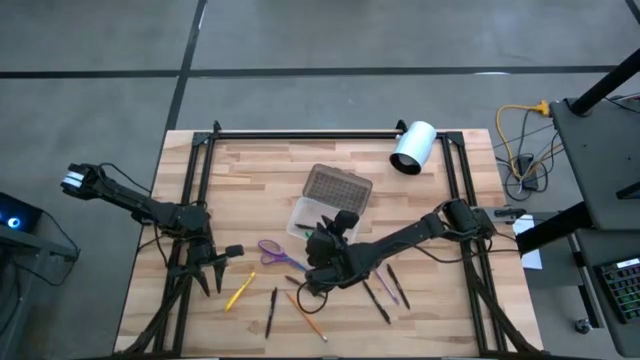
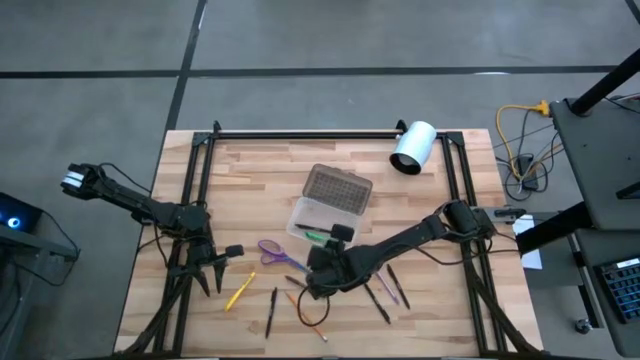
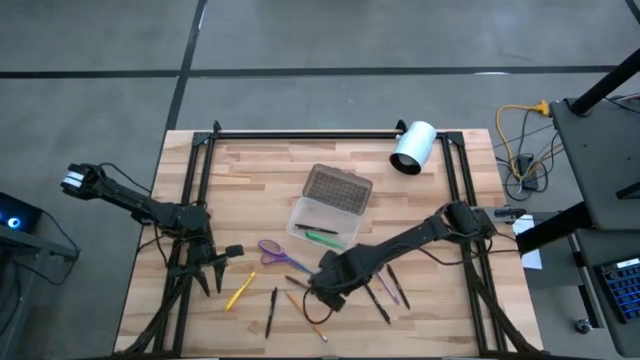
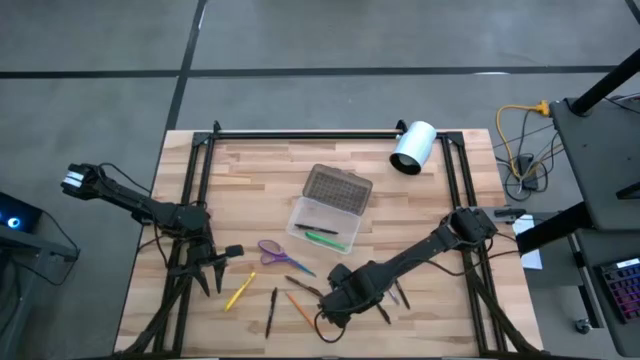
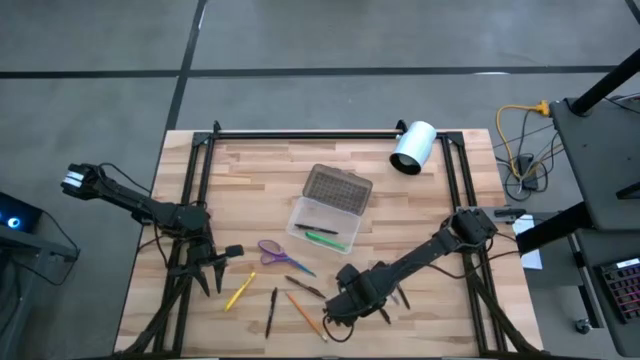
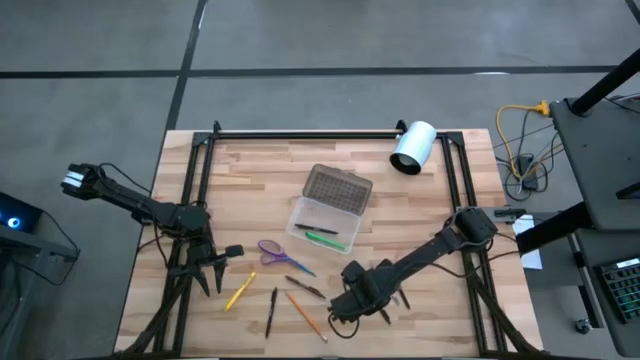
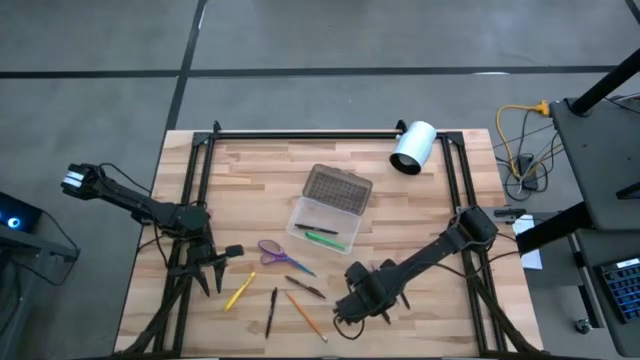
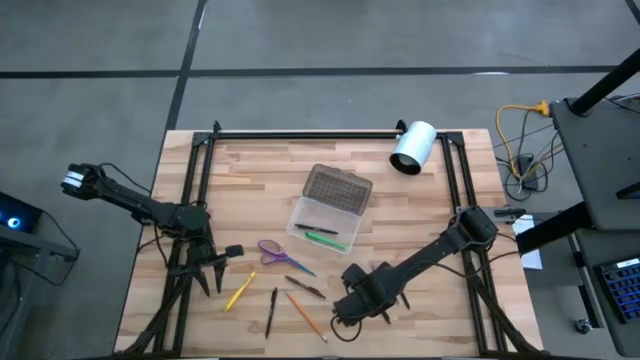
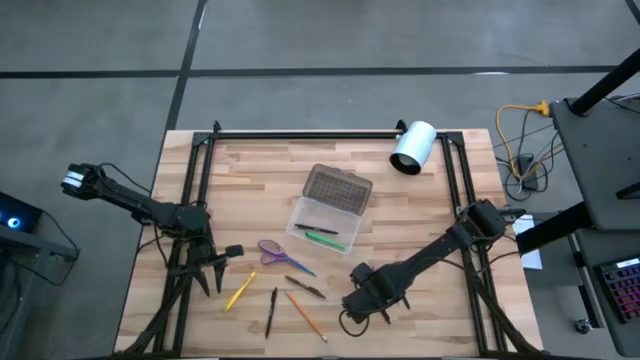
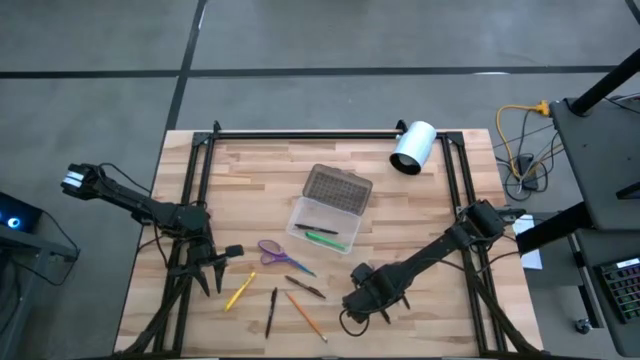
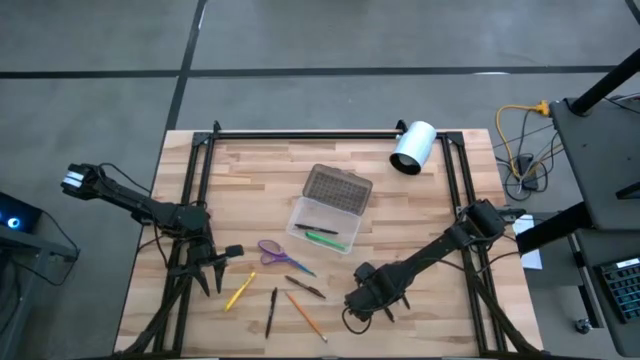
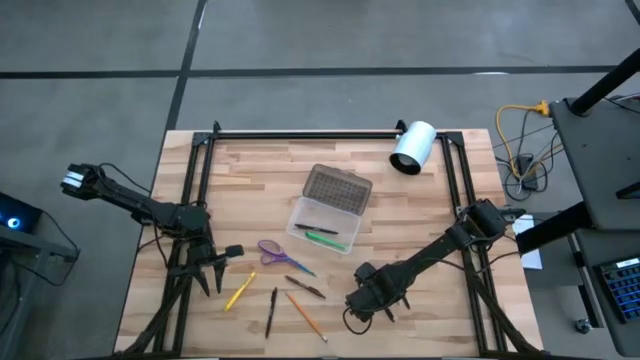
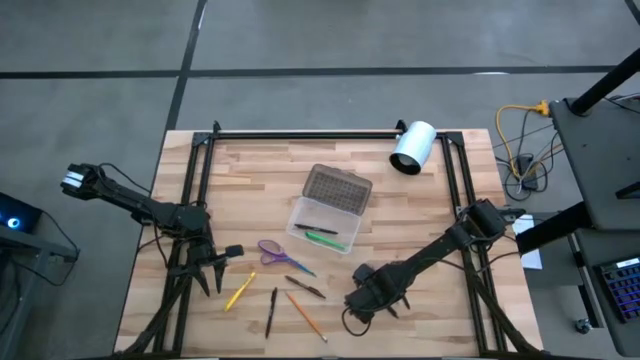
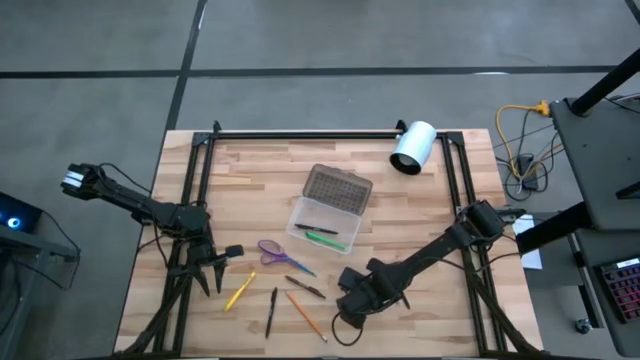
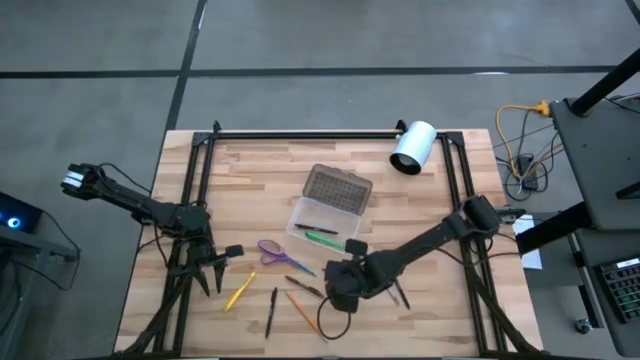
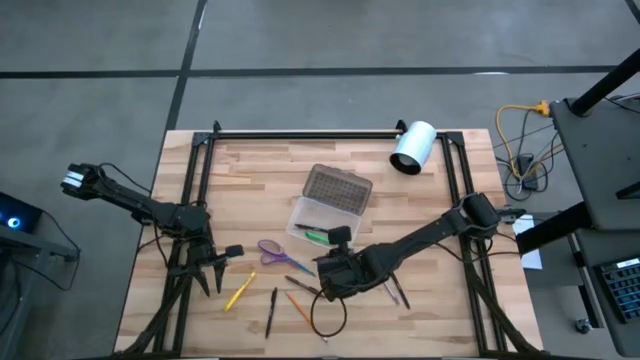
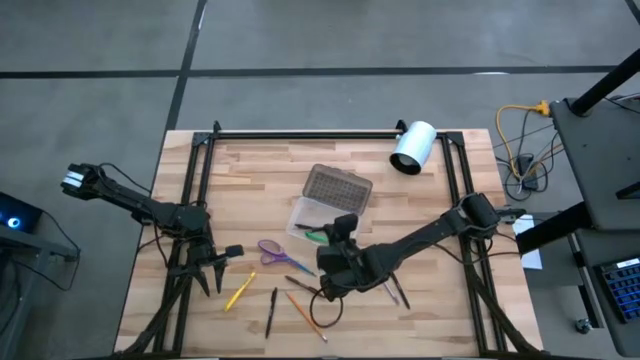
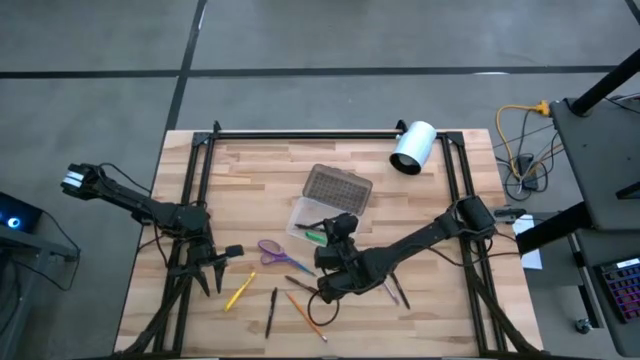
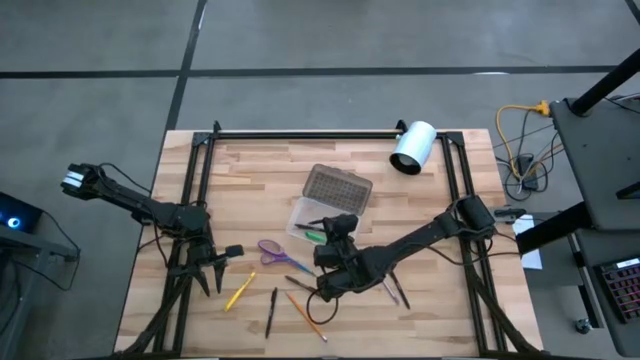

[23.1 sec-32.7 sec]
Task: Pick & place school supplies into a supply box
Put the black pen into the supply box

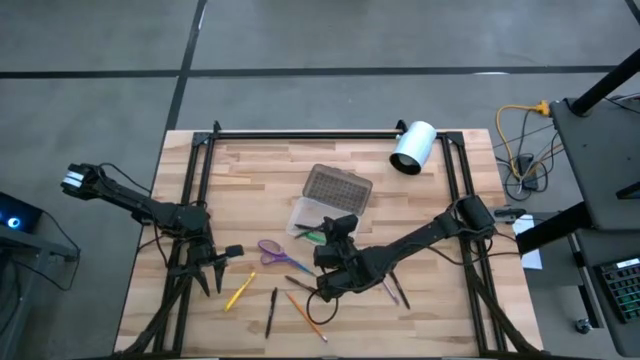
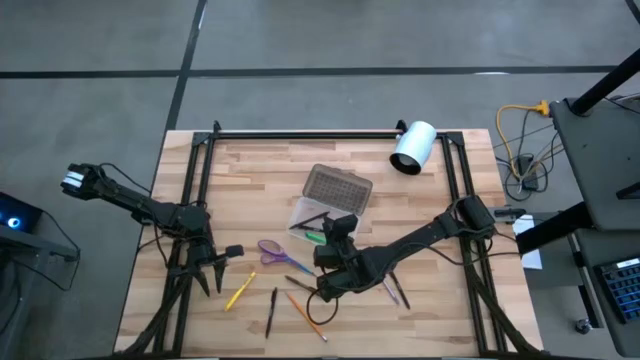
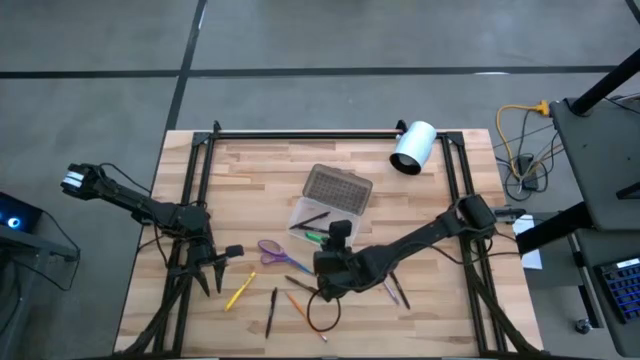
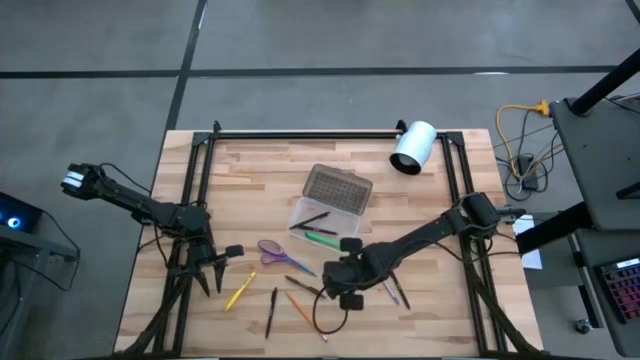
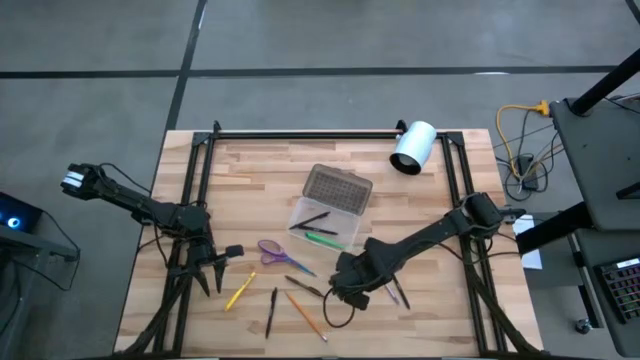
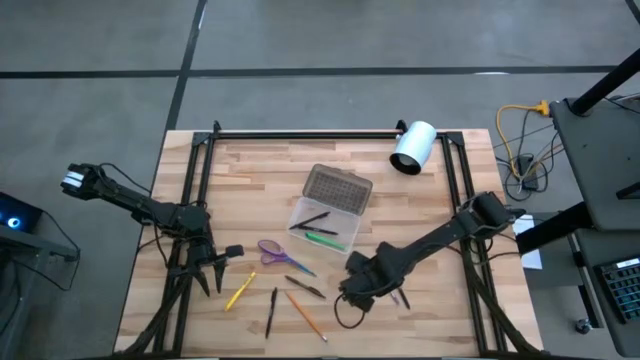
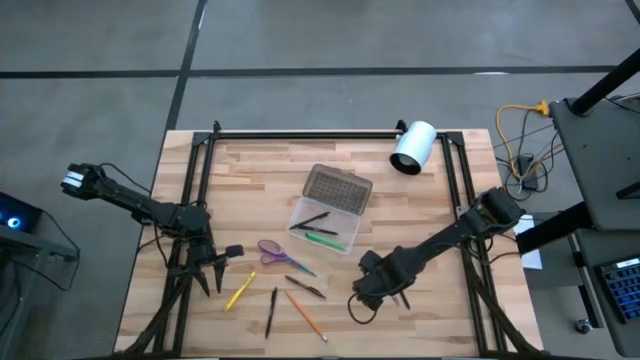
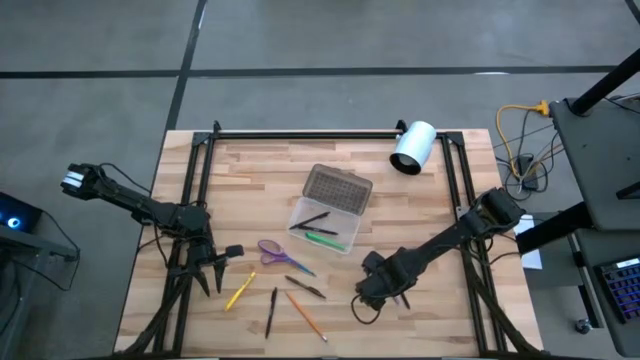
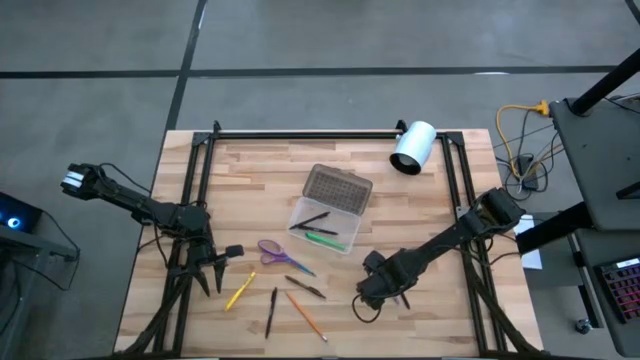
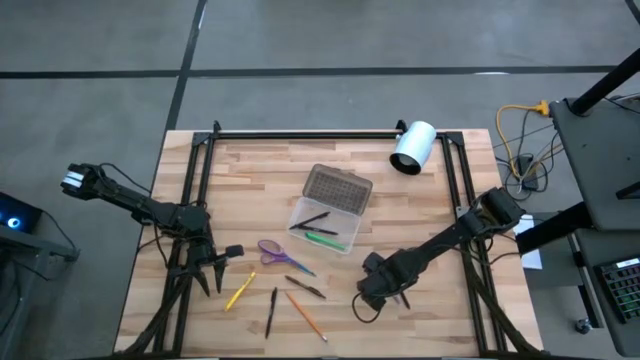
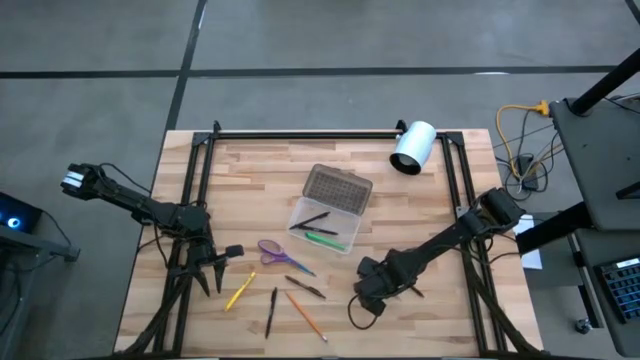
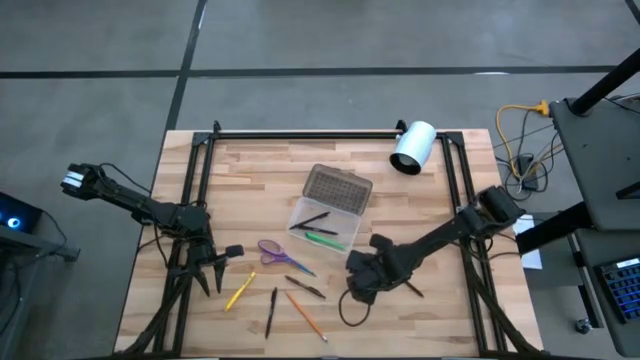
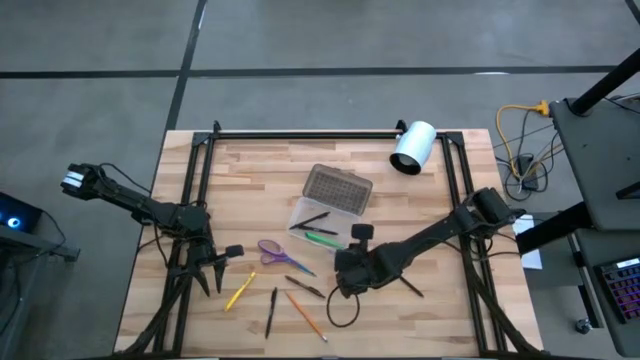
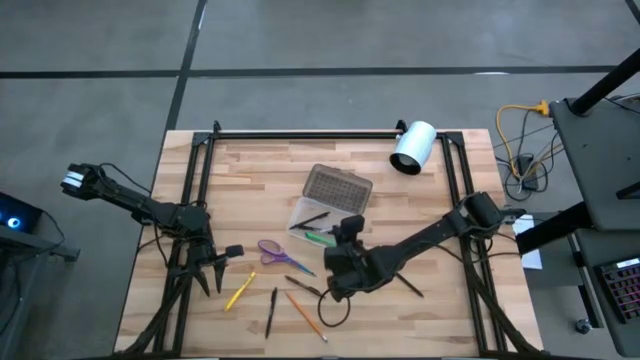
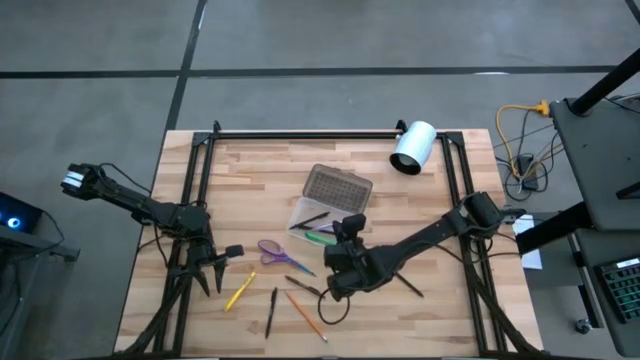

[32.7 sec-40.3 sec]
Put the violet pen into the supply box

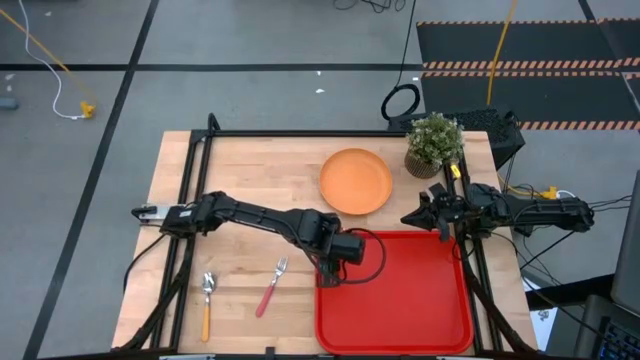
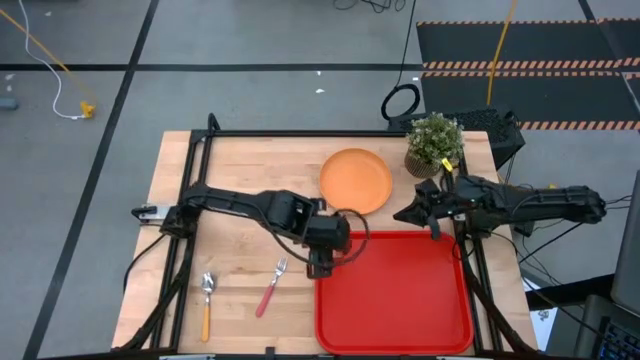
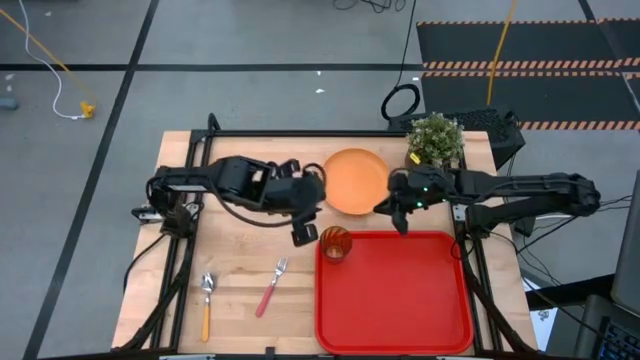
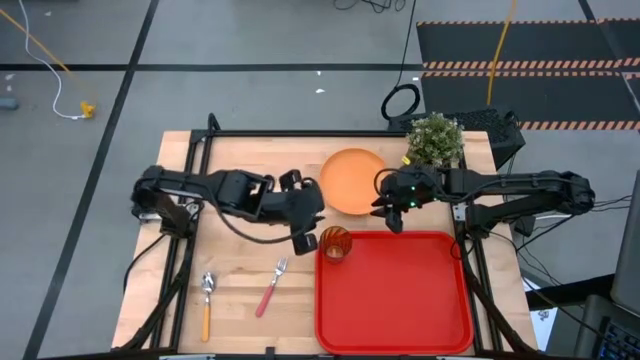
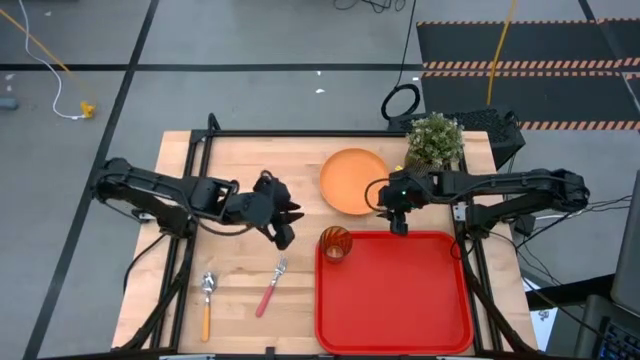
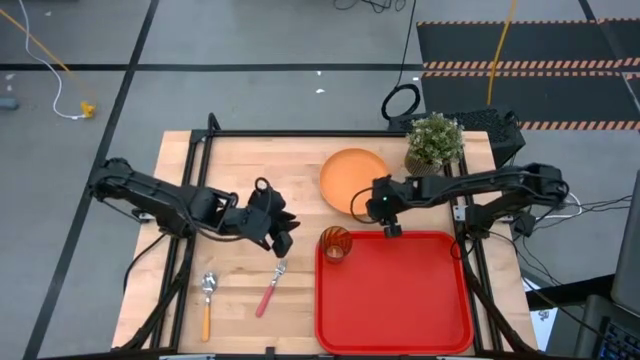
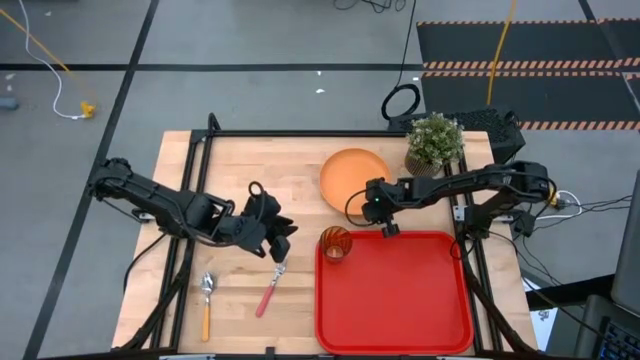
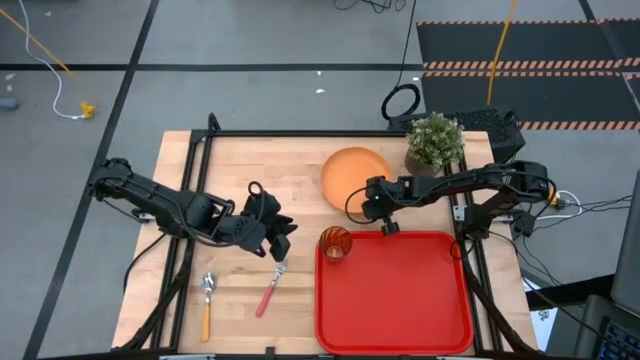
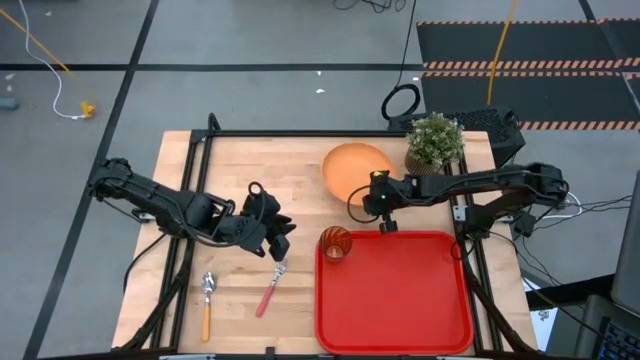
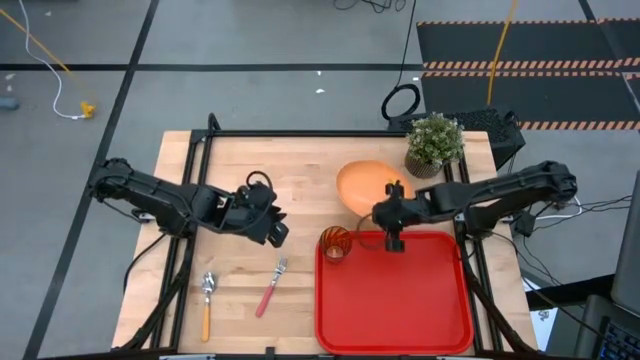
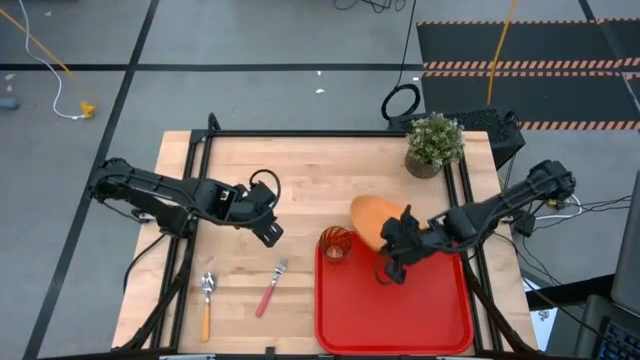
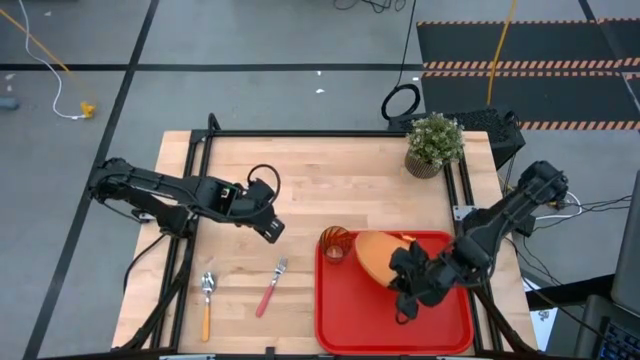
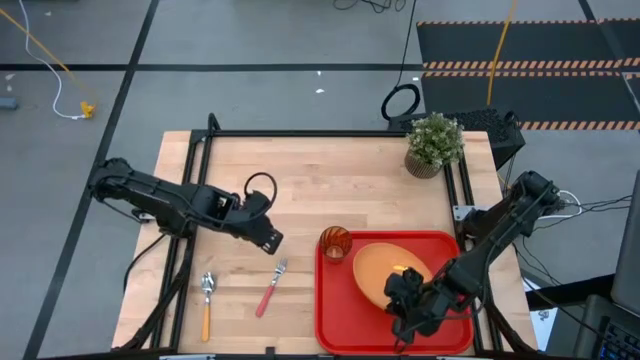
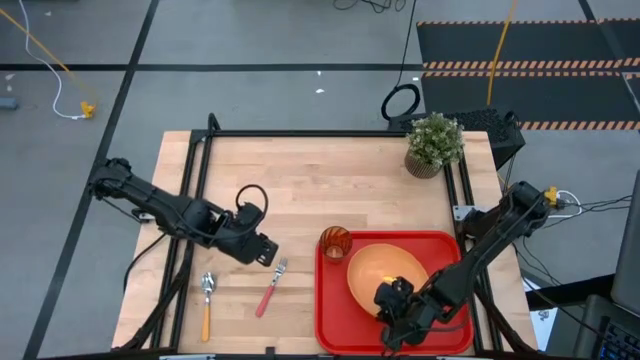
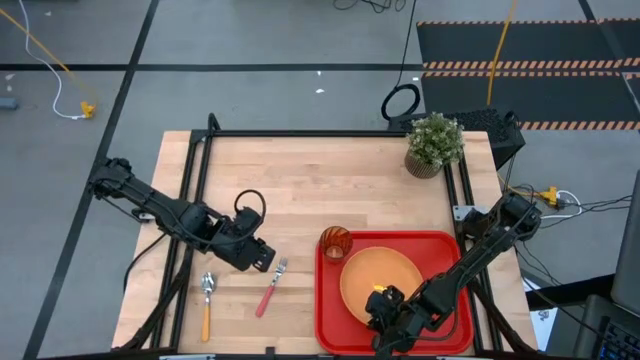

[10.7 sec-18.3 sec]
Task: Pick and place plate/cup/fork/spoon on tray
Put the orange plate on the red serving tray to the bottom right of the orange cup
